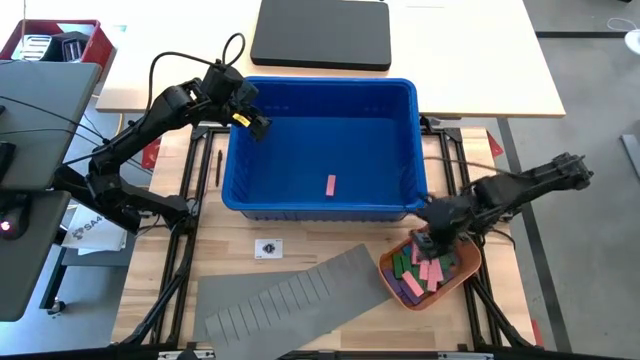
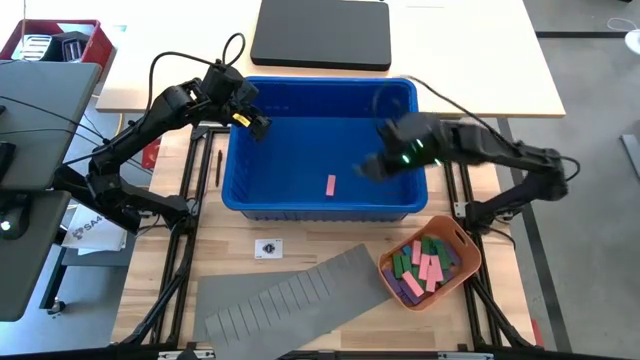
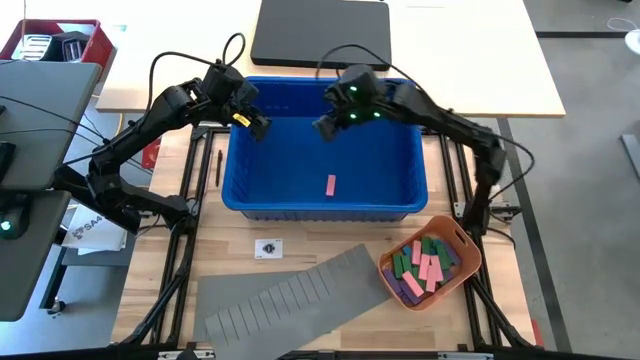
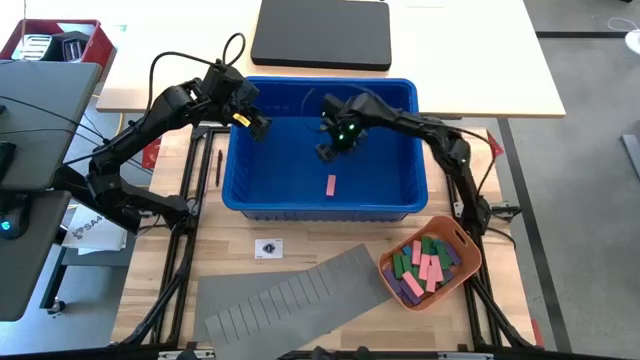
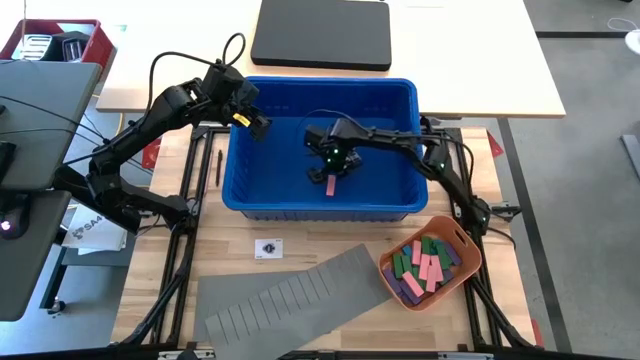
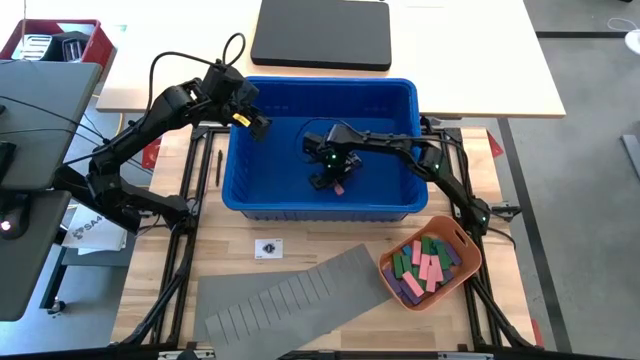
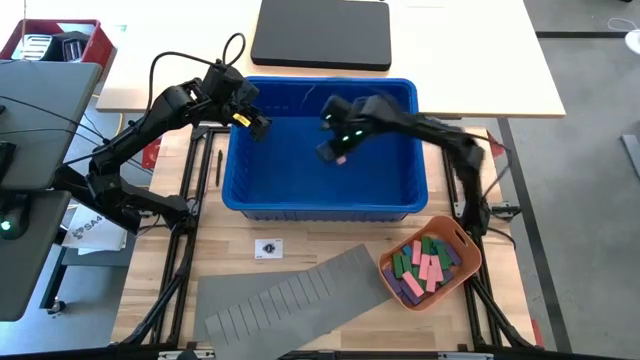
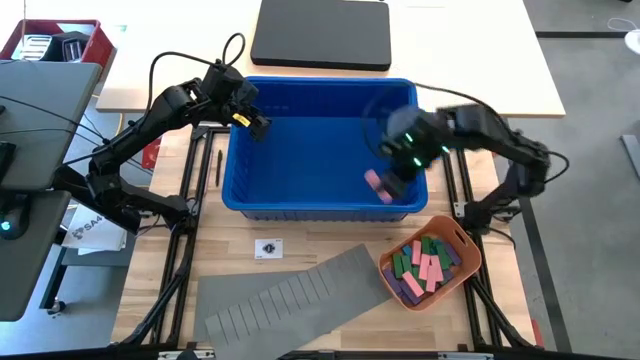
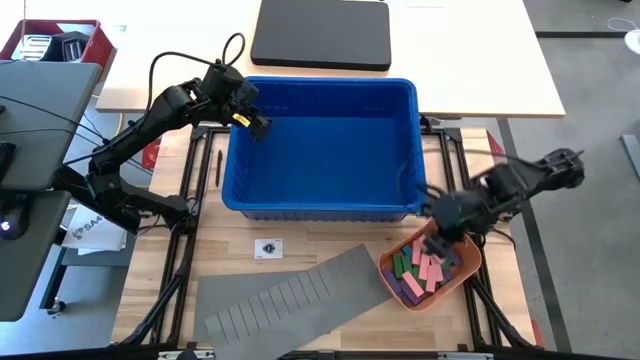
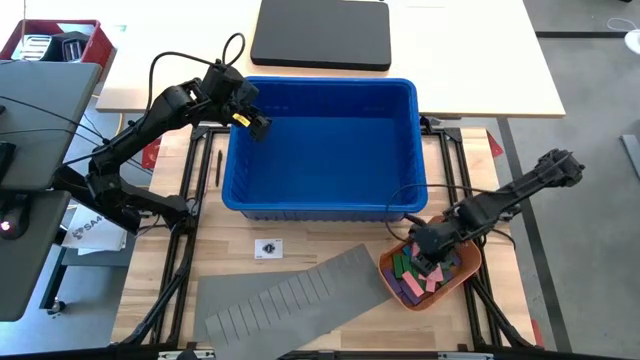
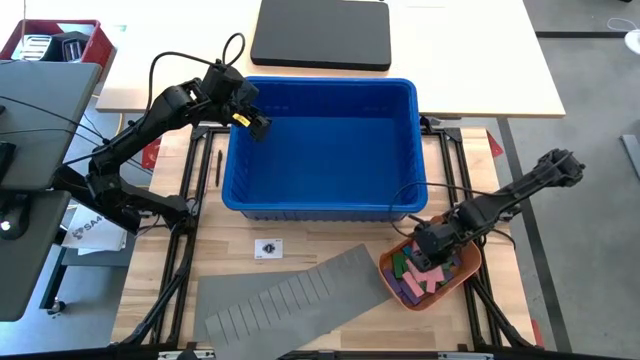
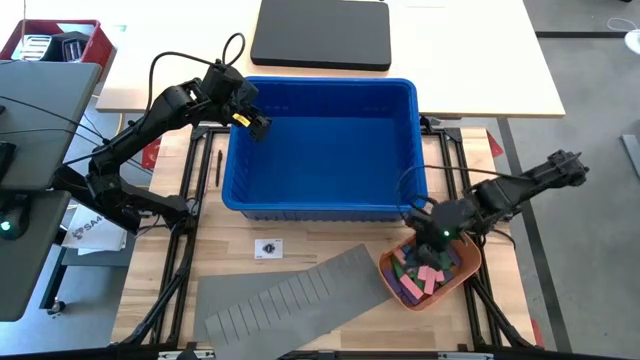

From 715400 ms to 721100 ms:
Task: Sort blocks
Put the pink block into the orange bin

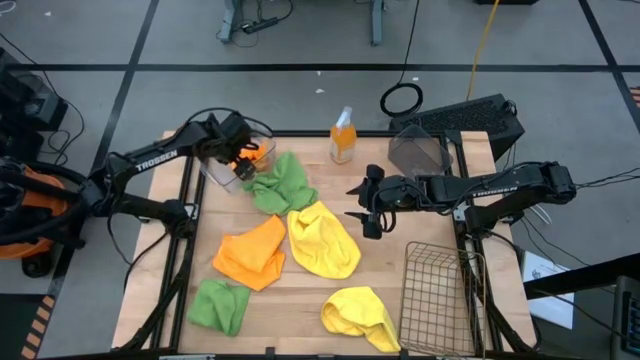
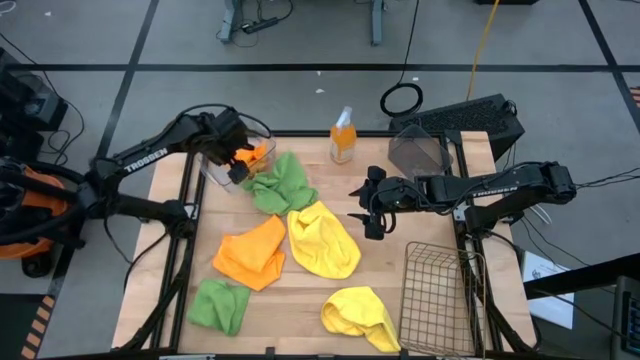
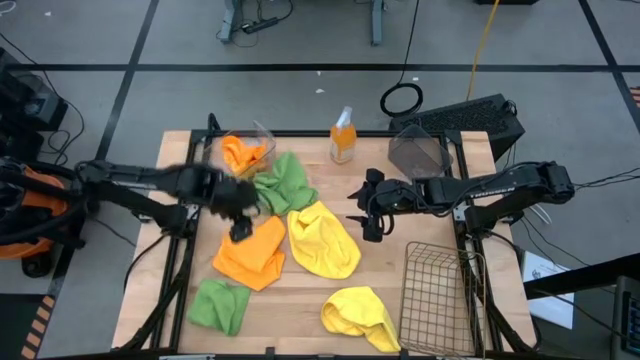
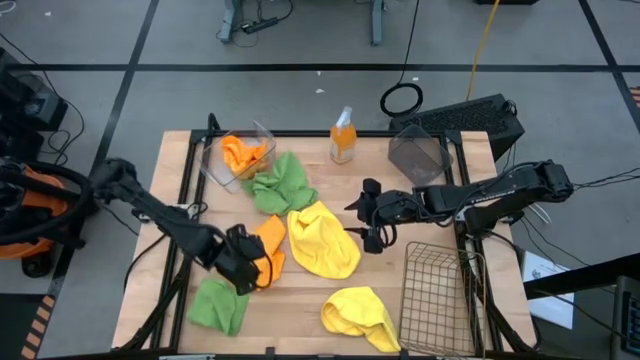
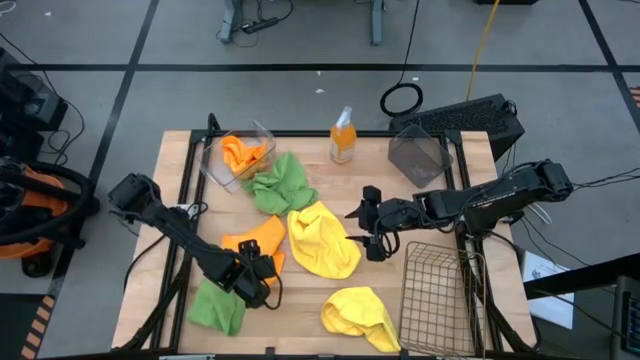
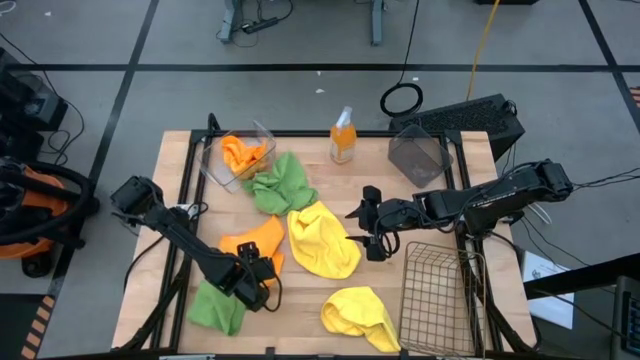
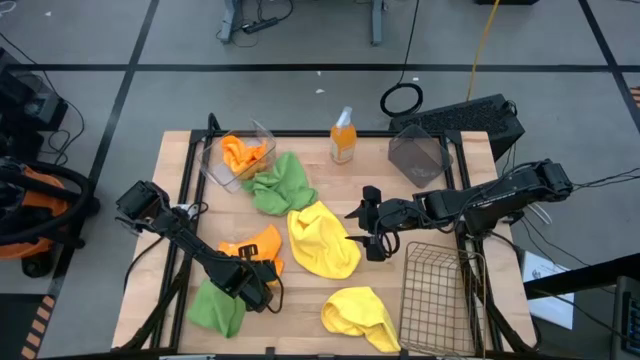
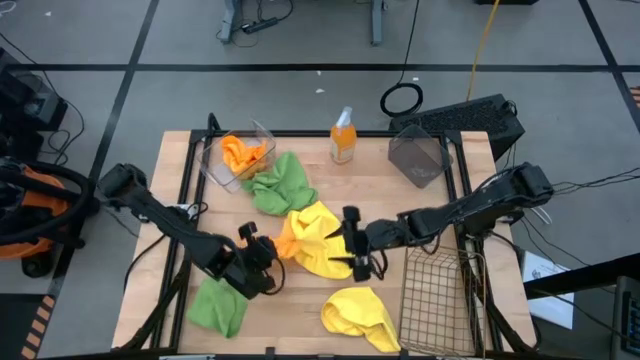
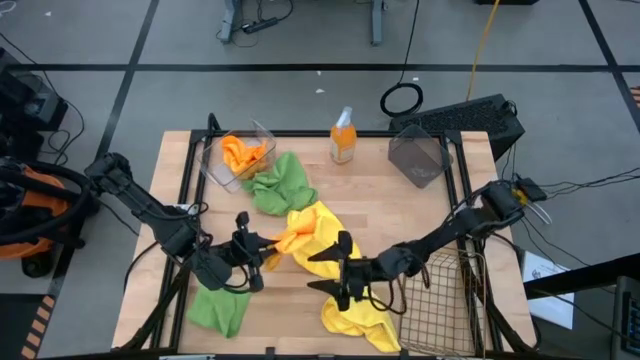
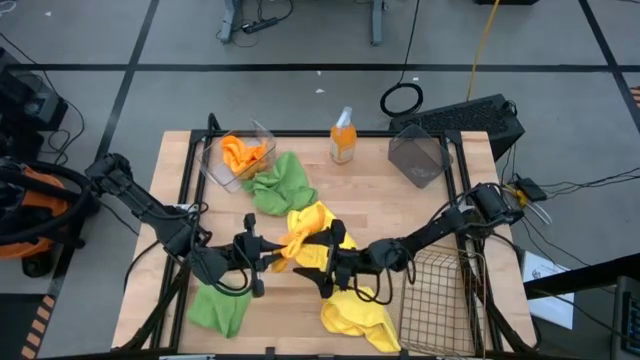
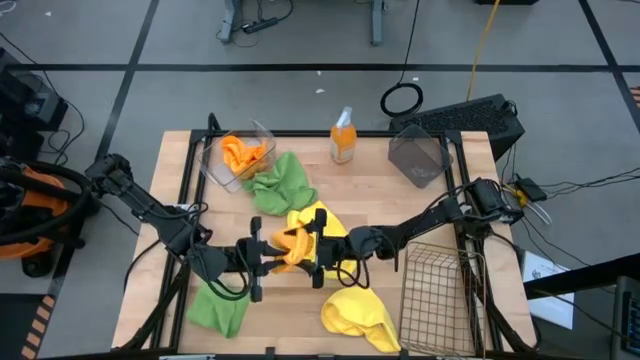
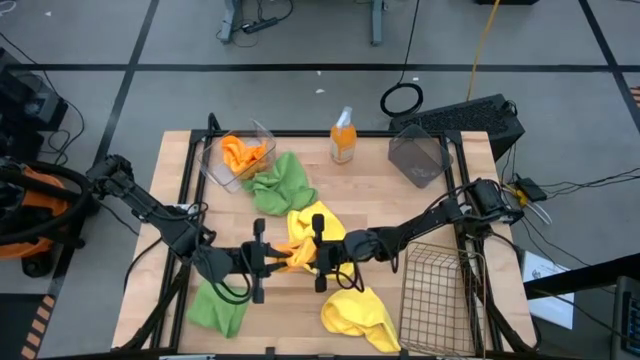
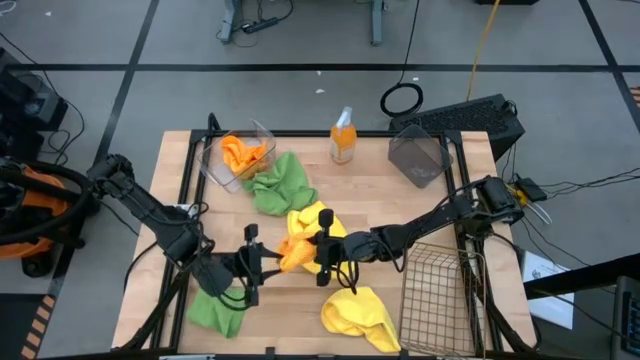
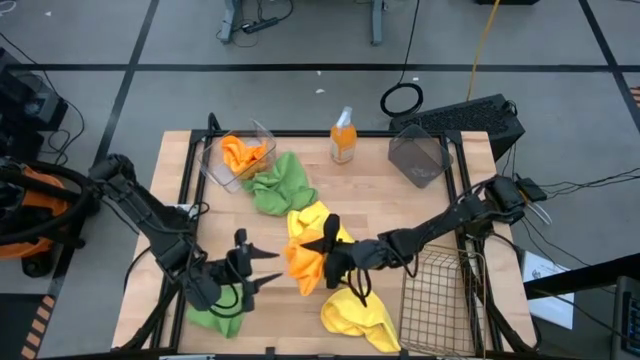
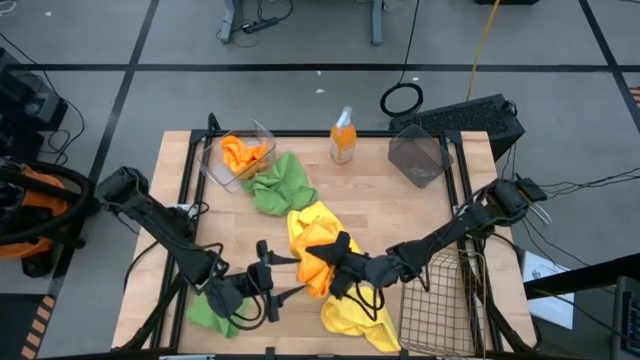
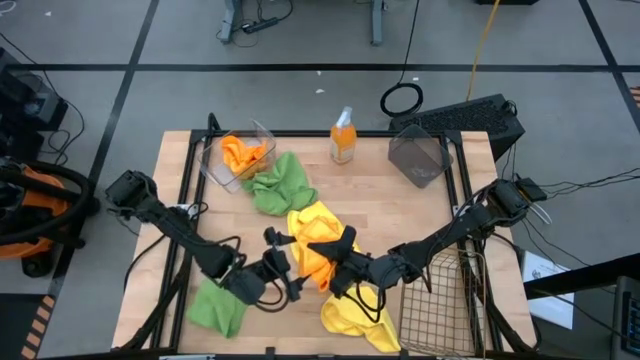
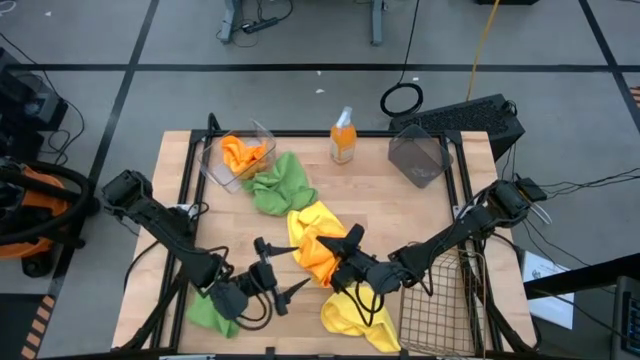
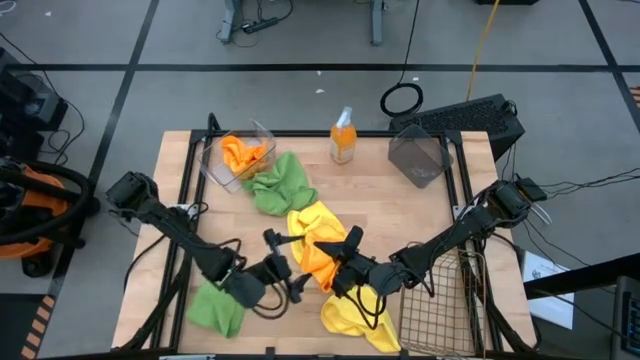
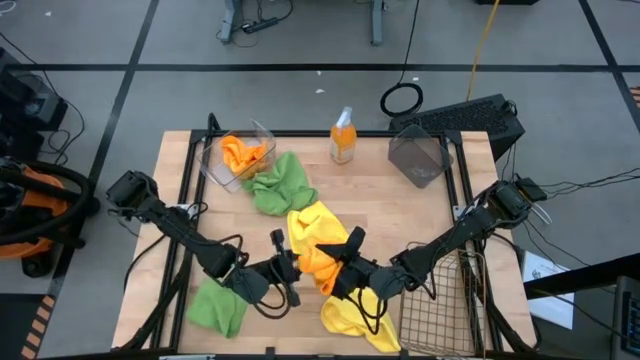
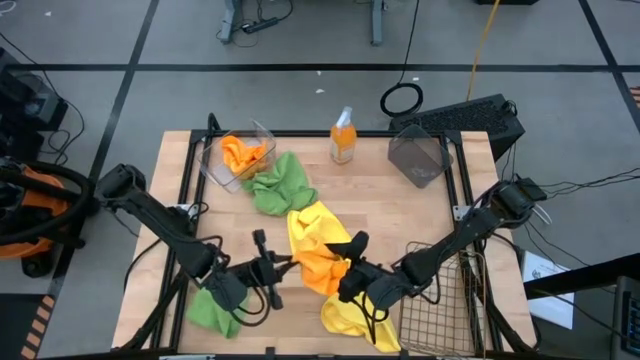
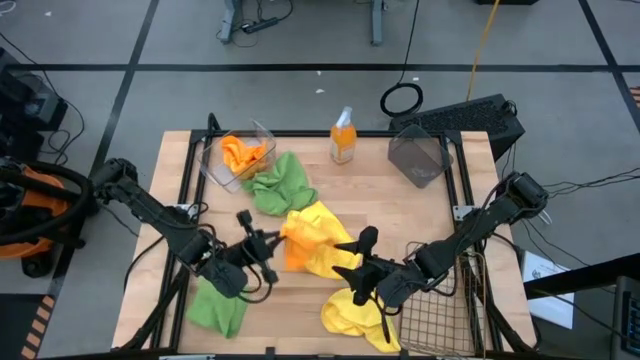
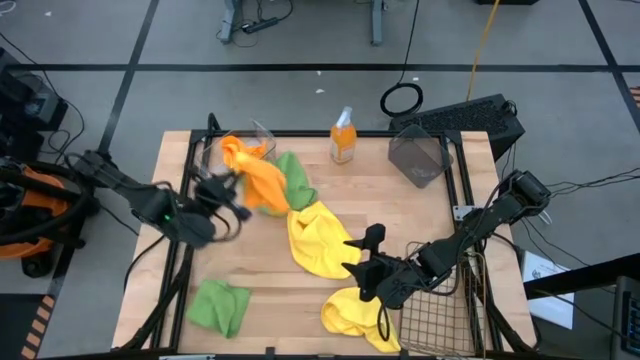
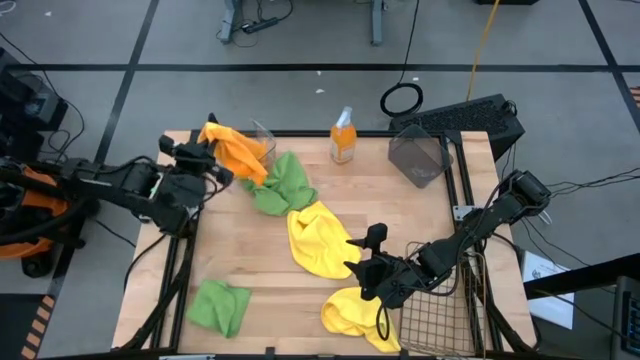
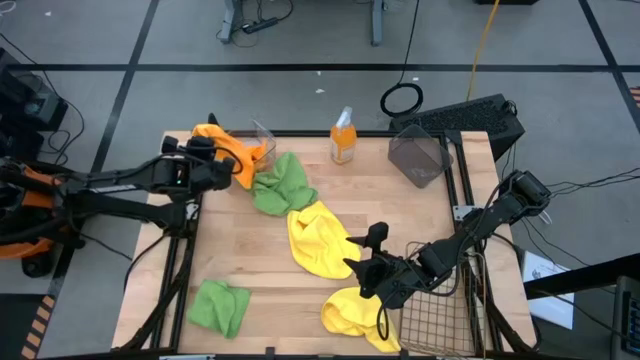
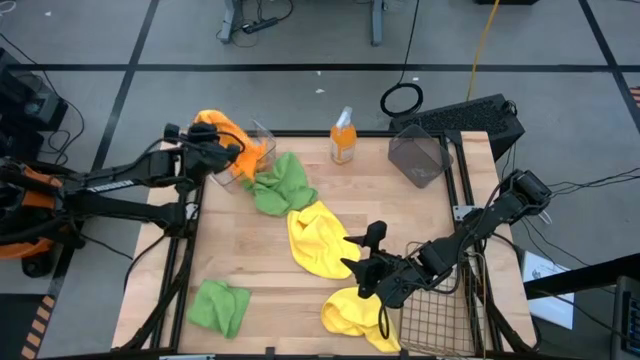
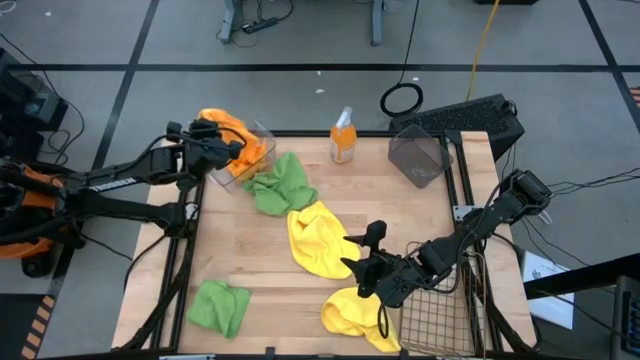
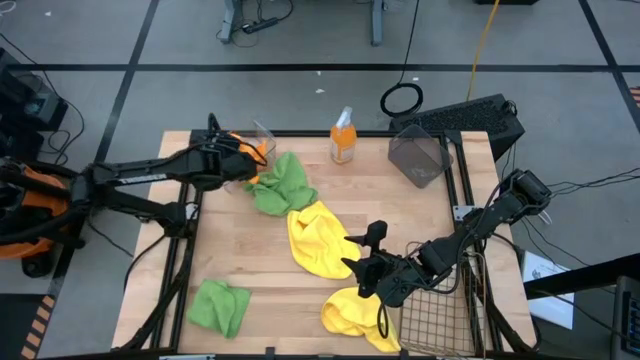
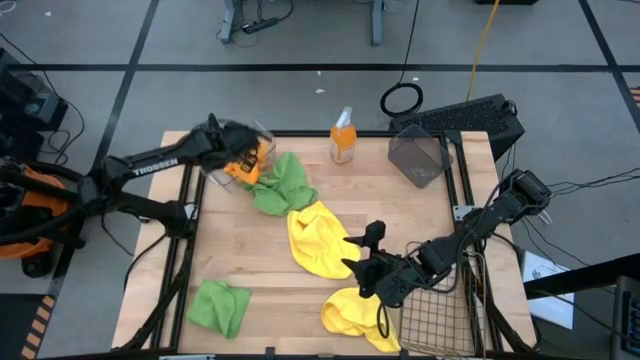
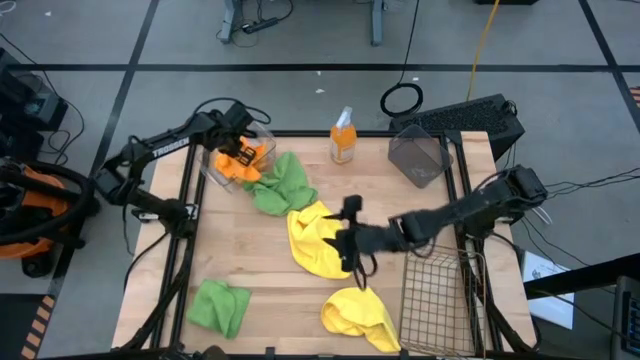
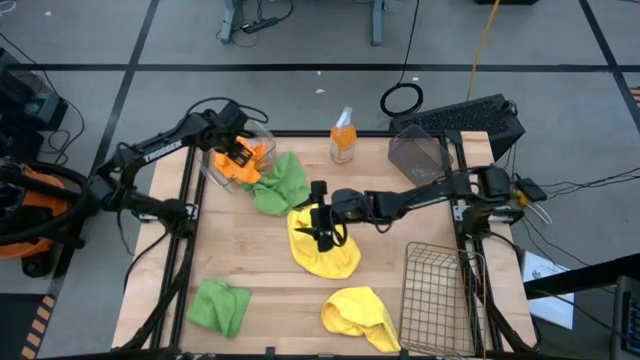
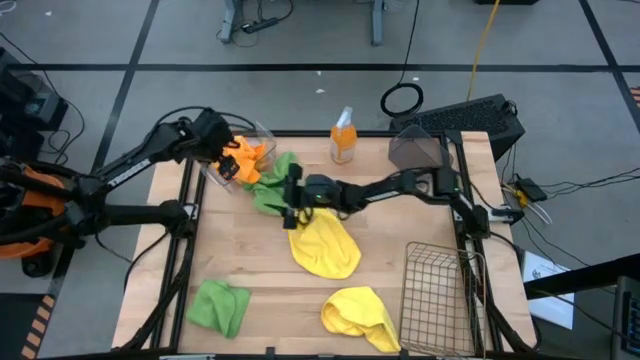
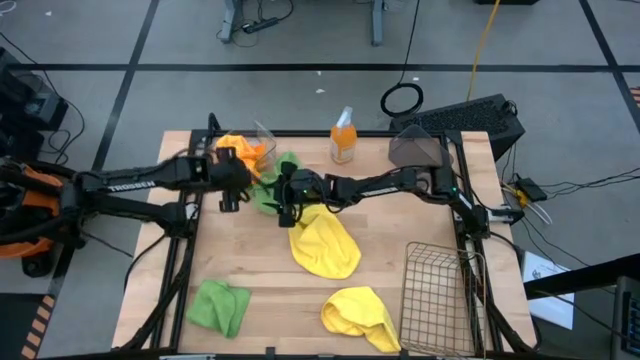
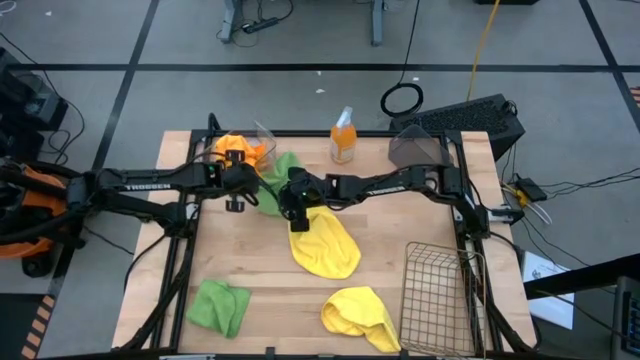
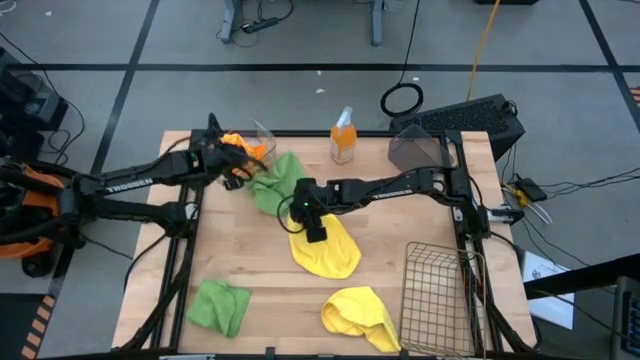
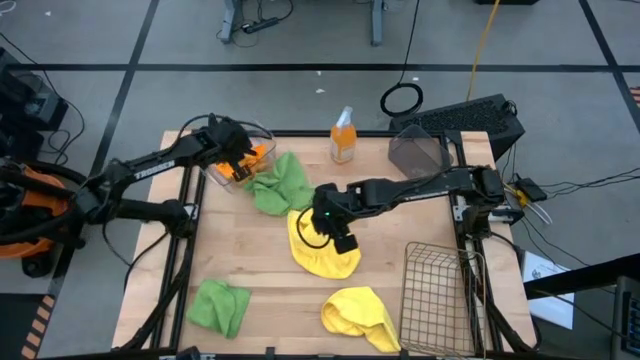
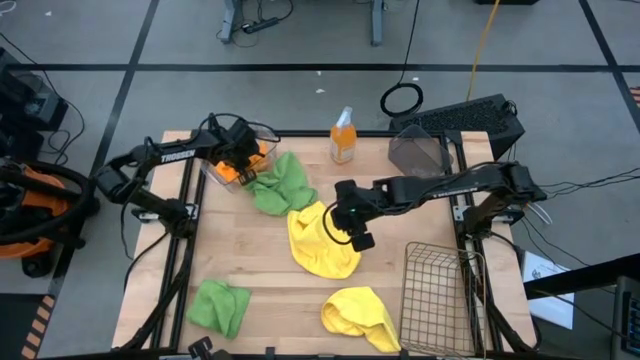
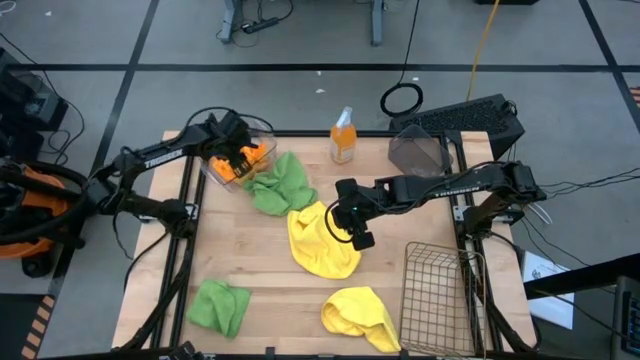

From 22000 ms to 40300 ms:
Task: Sort microfiber towel by color & place in baskets
Put the orange microfiber cloth into the transparent bin
